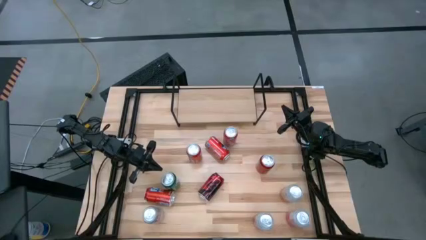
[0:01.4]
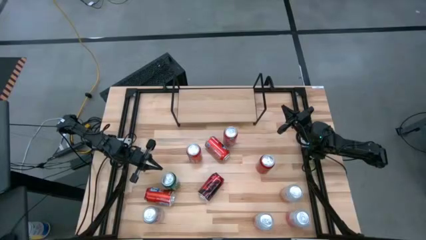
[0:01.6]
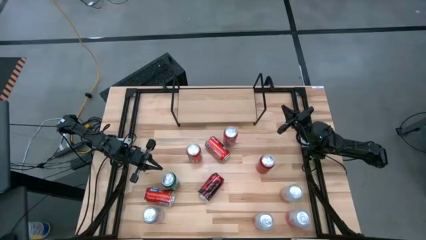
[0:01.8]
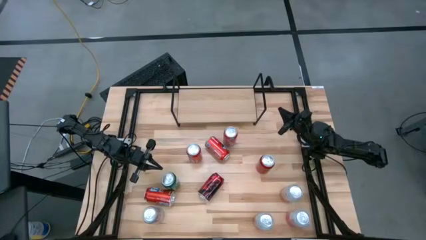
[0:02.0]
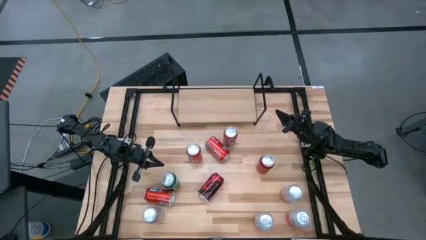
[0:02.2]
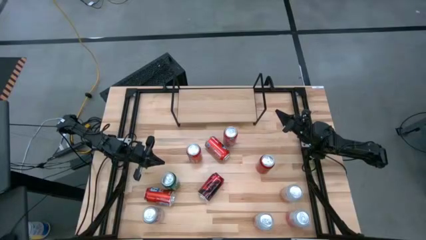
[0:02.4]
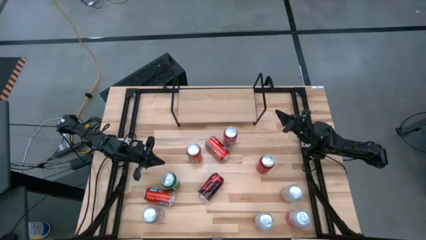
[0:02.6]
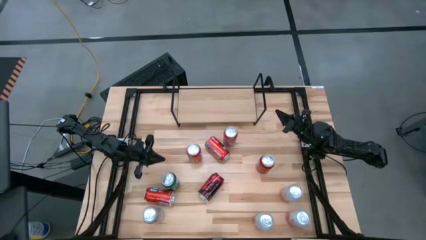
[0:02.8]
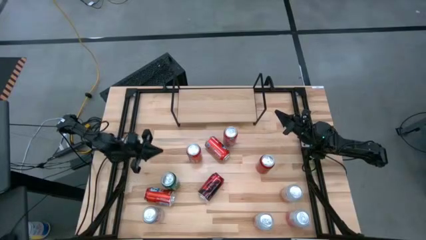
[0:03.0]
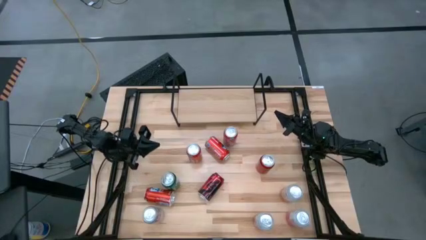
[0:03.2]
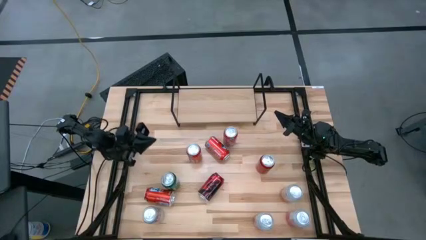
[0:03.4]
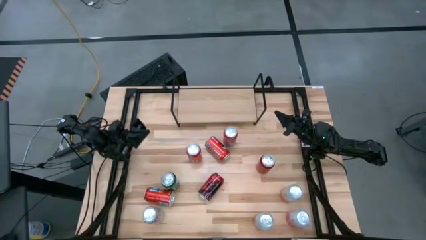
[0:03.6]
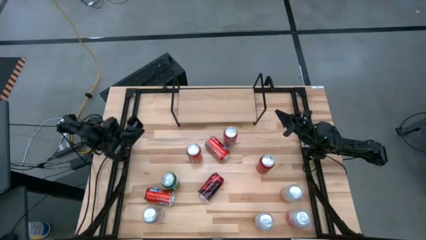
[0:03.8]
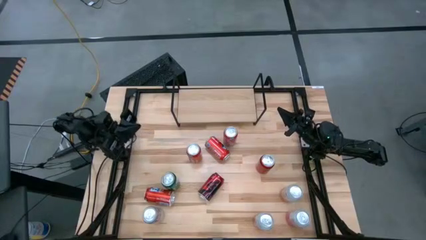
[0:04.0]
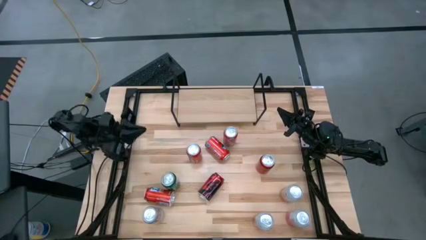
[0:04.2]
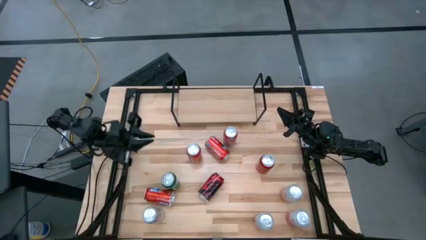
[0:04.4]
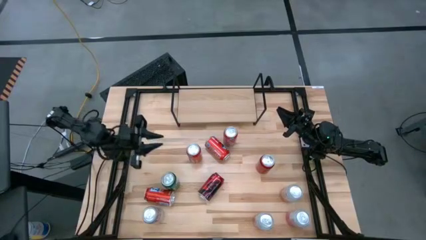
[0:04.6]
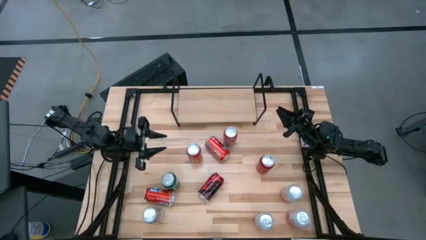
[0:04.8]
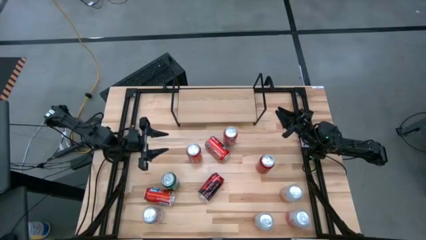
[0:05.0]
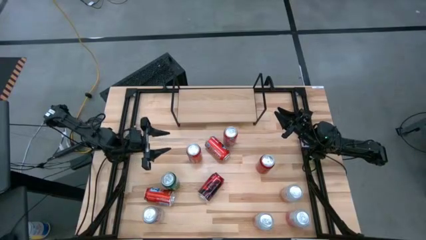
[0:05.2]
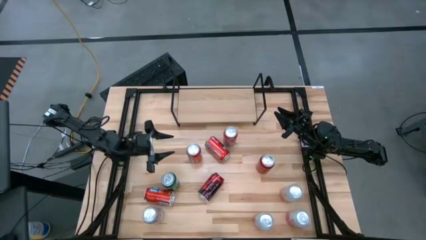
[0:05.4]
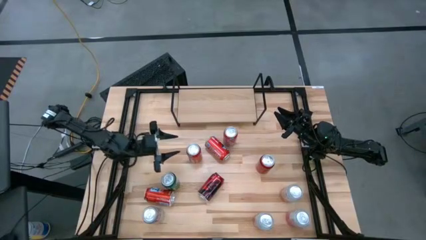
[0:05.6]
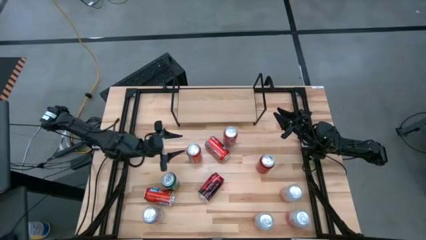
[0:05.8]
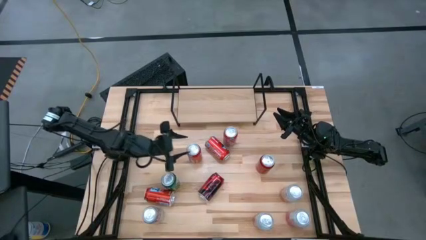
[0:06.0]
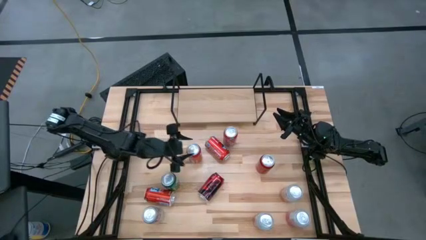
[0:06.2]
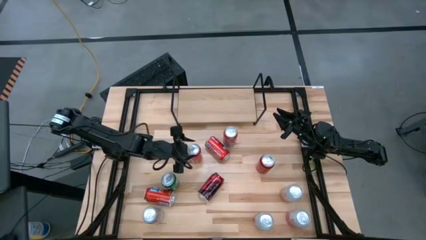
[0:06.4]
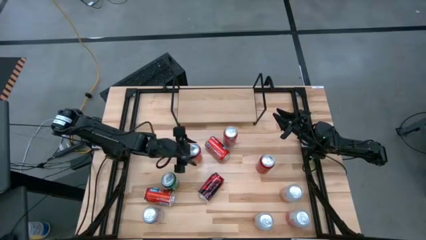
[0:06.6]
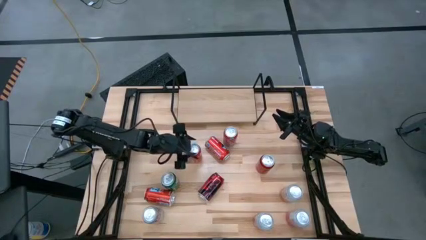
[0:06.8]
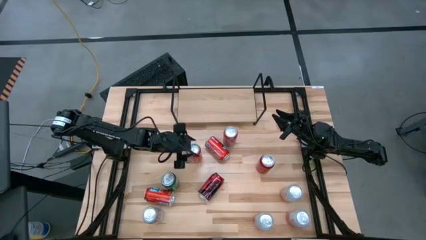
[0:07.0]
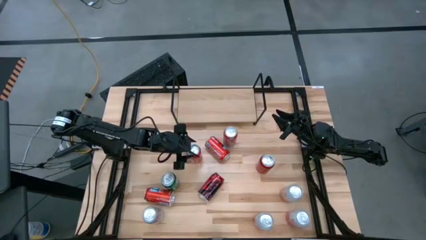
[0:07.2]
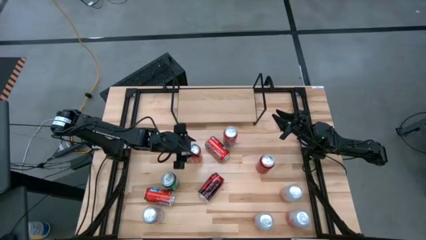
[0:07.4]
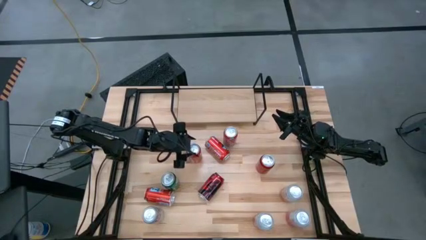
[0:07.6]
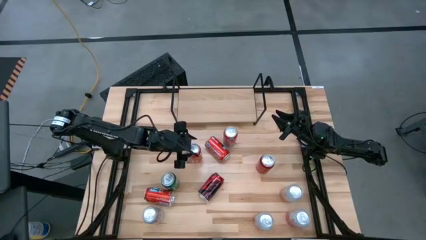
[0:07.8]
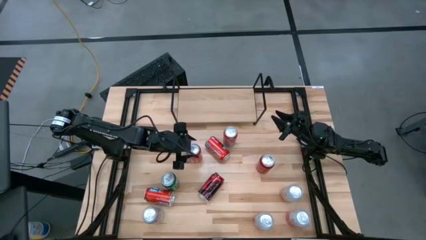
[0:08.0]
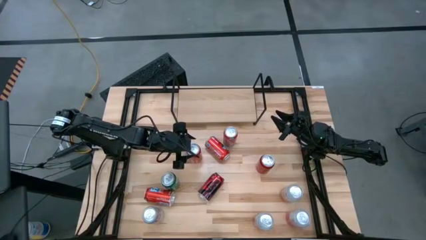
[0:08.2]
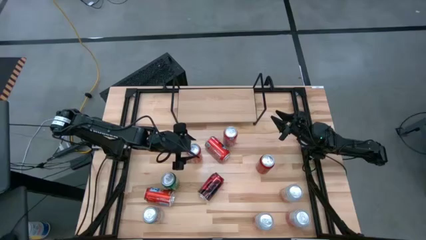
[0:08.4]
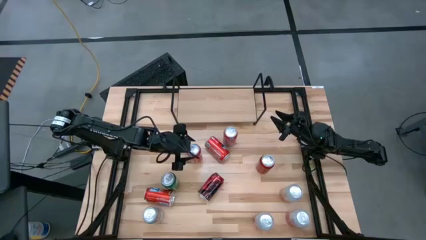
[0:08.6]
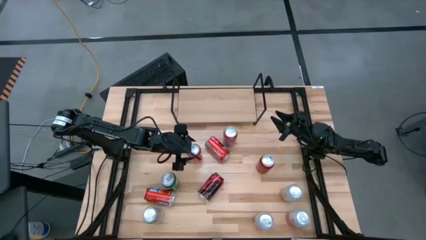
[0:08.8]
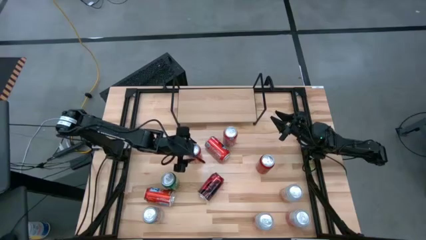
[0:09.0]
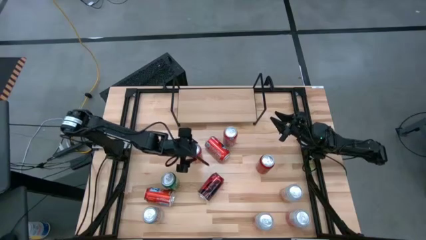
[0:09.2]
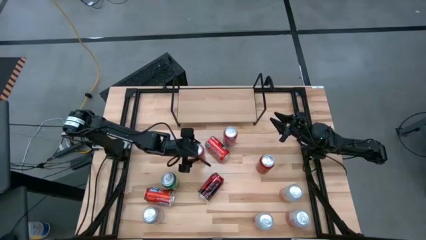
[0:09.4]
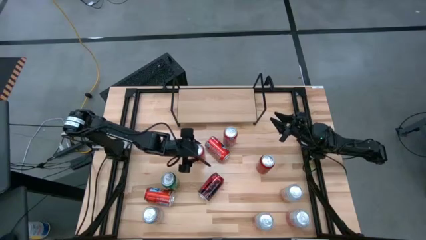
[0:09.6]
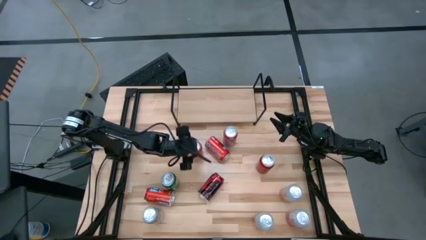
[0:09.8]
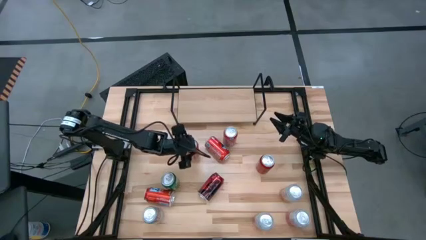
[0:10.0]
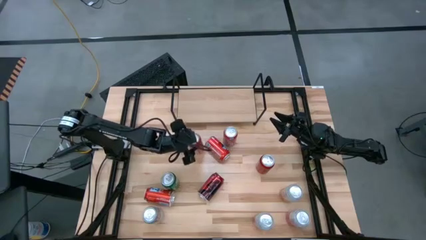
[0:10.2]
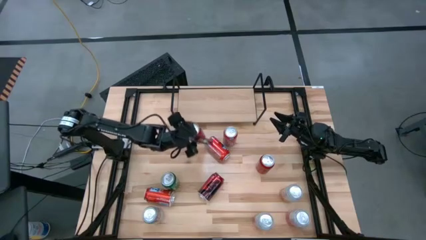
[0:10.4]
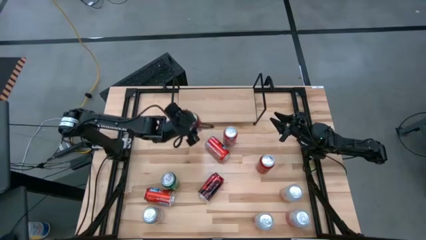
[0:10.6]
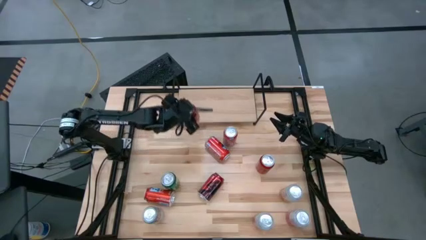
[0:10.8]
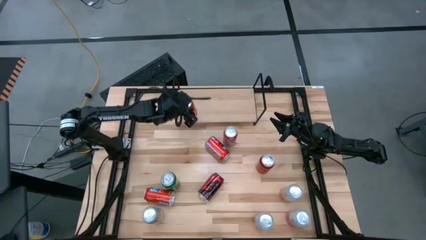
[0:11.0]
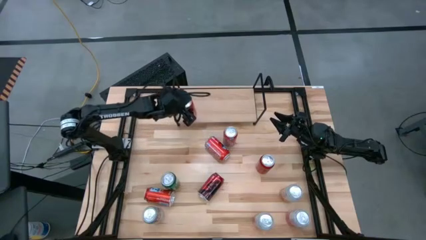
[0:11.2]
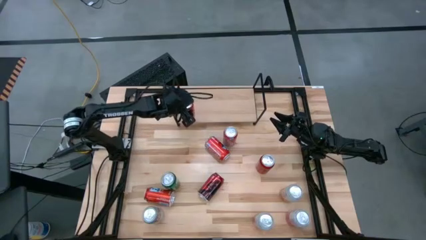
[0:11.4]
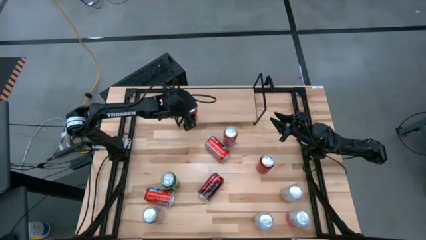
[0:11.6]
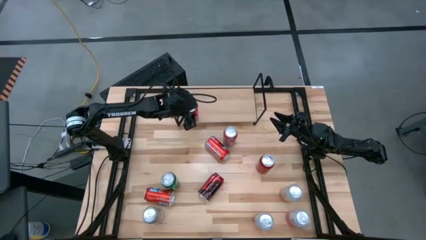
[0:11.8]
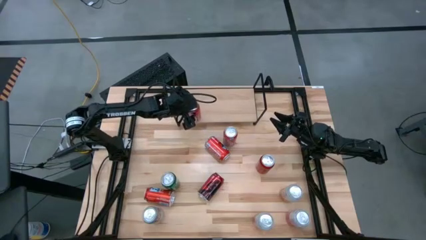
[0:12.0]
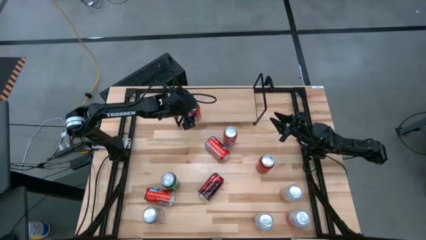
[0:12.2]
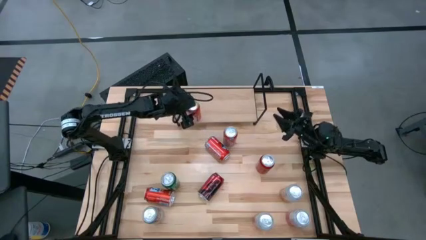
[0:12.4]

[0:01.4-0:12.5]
Task: Place canned beverage on shelf
Put the red soda can on the shelf
